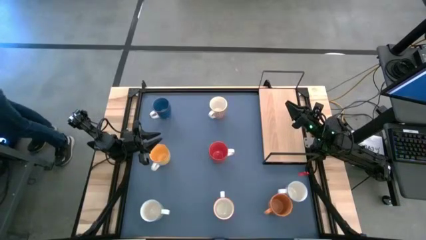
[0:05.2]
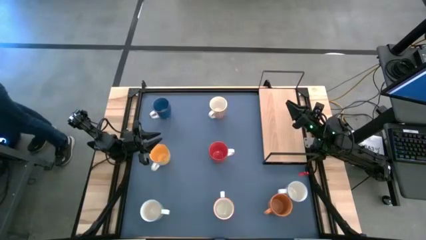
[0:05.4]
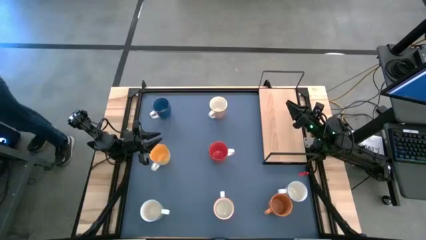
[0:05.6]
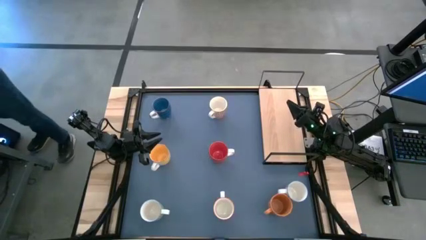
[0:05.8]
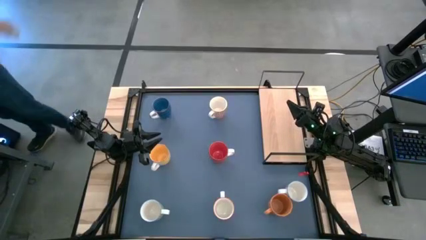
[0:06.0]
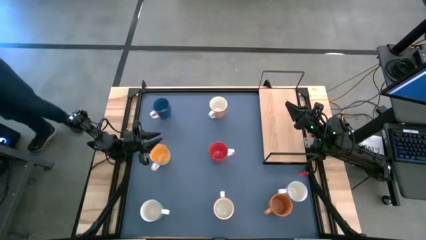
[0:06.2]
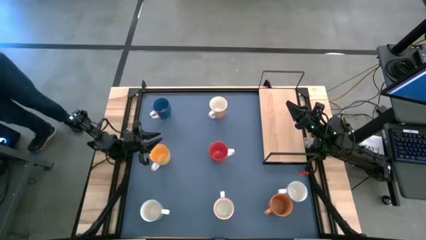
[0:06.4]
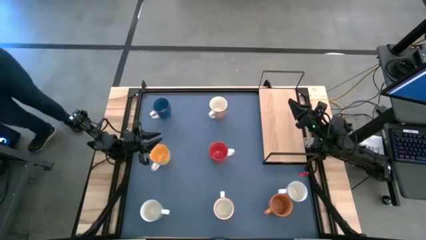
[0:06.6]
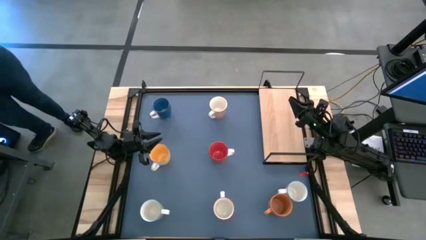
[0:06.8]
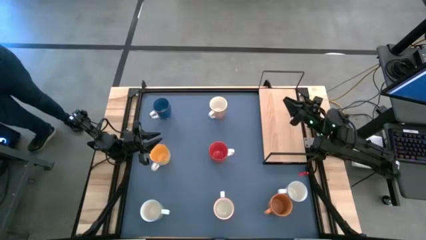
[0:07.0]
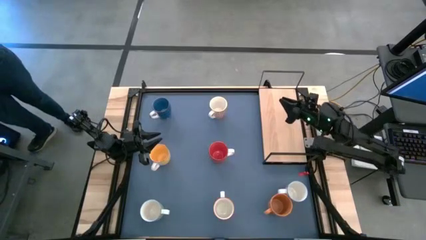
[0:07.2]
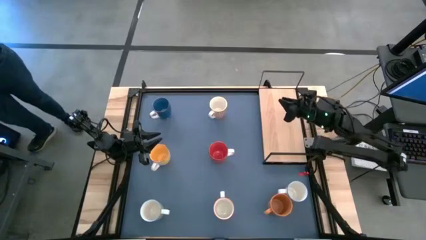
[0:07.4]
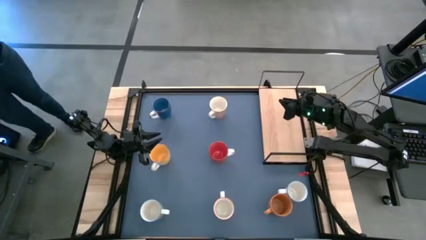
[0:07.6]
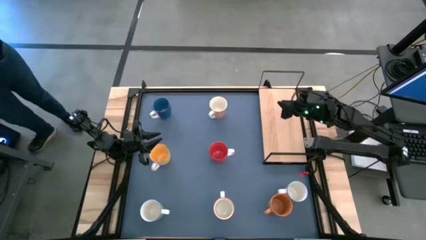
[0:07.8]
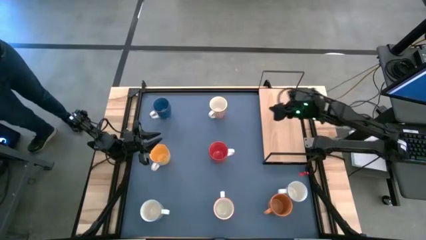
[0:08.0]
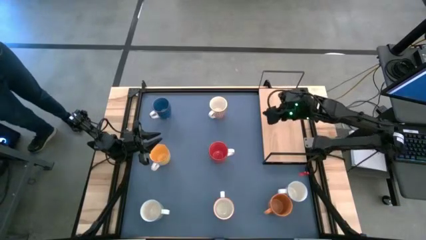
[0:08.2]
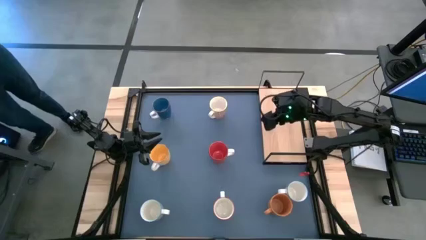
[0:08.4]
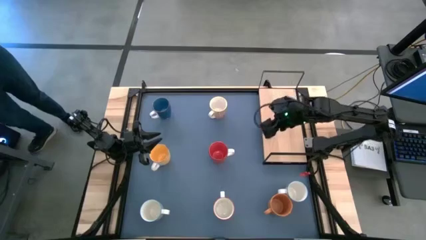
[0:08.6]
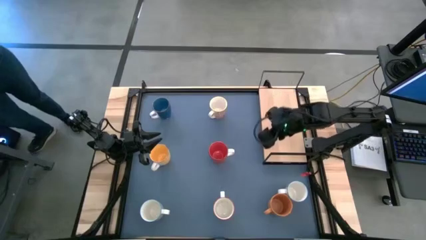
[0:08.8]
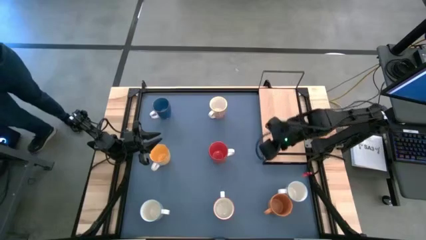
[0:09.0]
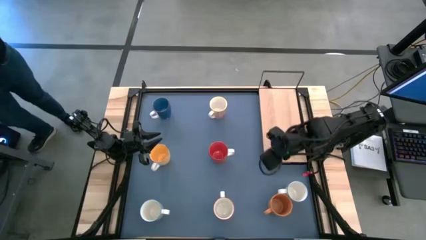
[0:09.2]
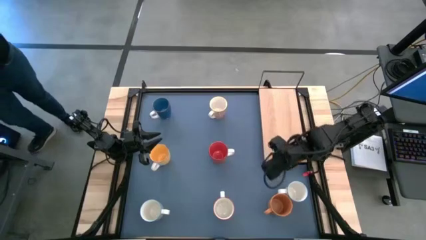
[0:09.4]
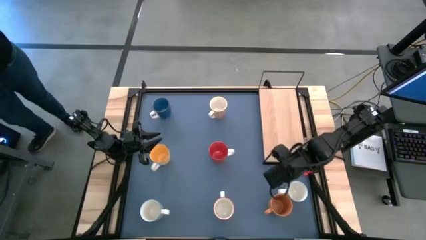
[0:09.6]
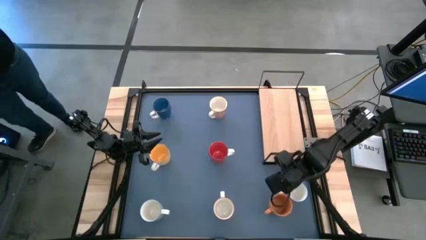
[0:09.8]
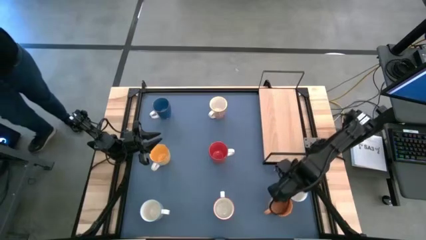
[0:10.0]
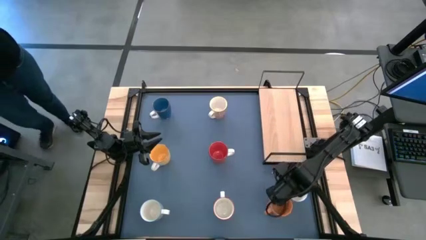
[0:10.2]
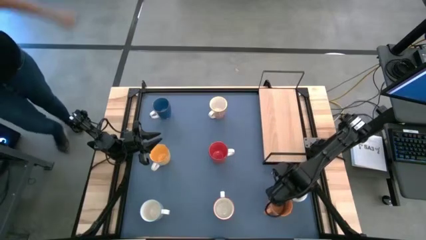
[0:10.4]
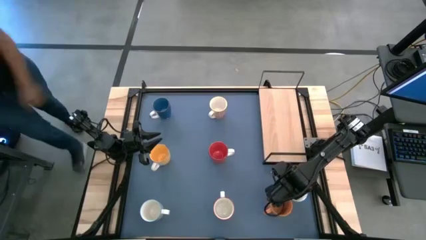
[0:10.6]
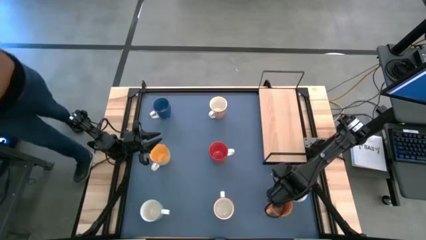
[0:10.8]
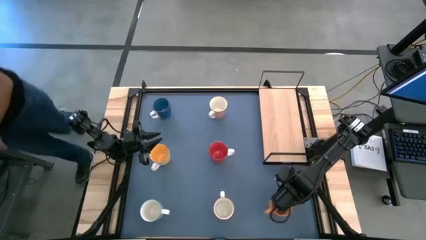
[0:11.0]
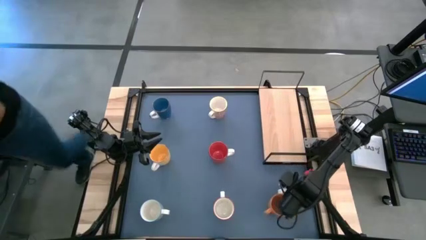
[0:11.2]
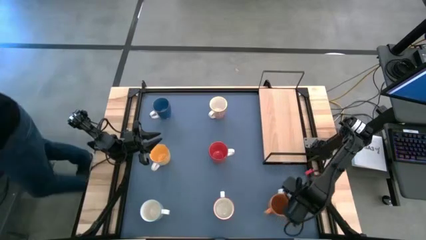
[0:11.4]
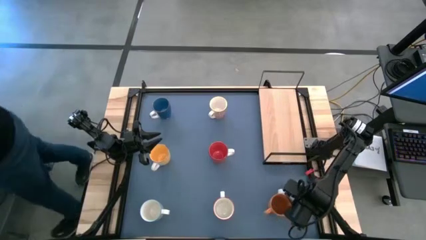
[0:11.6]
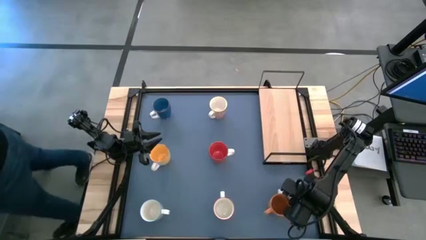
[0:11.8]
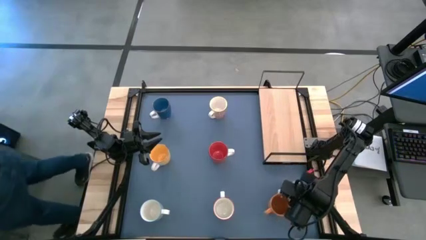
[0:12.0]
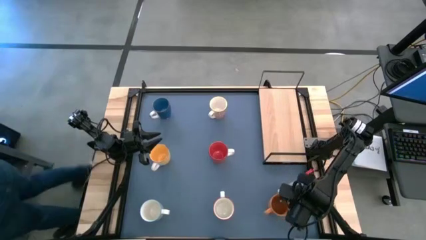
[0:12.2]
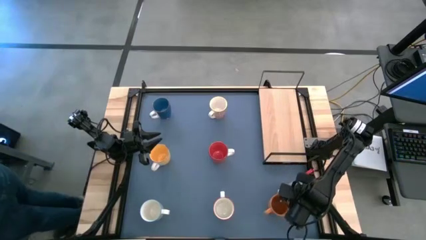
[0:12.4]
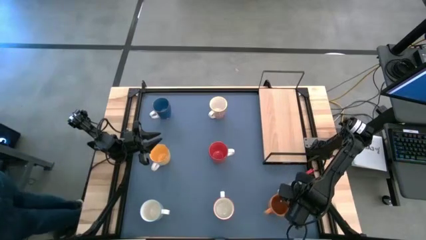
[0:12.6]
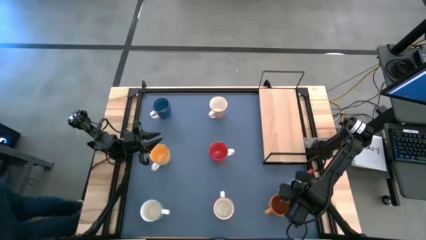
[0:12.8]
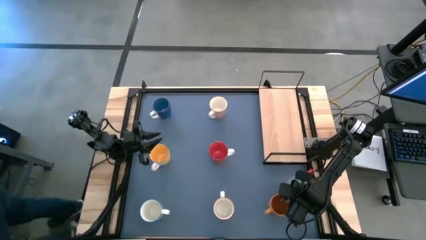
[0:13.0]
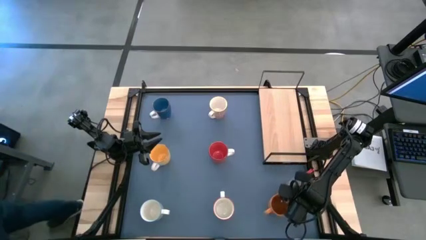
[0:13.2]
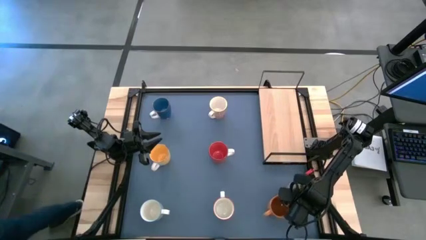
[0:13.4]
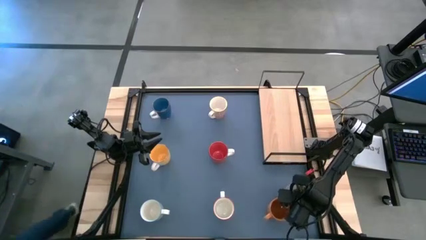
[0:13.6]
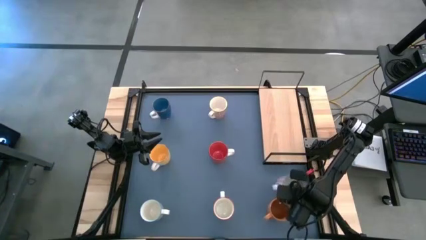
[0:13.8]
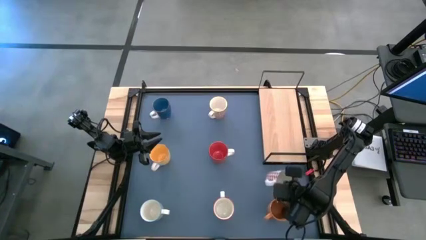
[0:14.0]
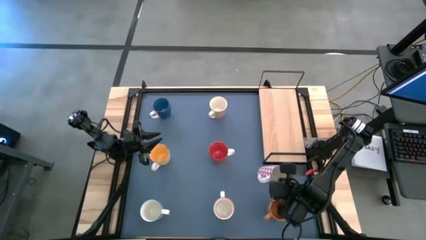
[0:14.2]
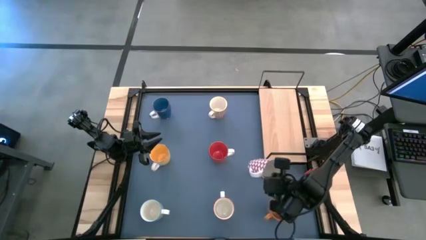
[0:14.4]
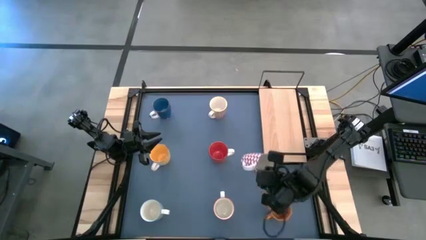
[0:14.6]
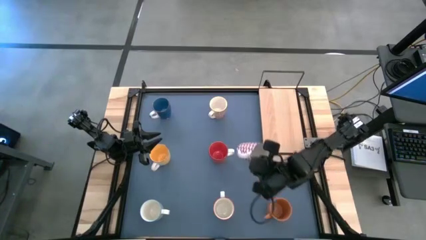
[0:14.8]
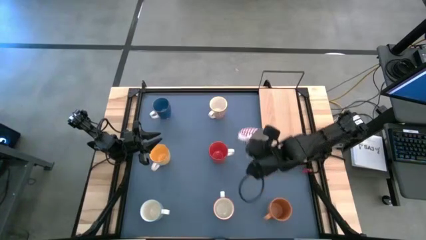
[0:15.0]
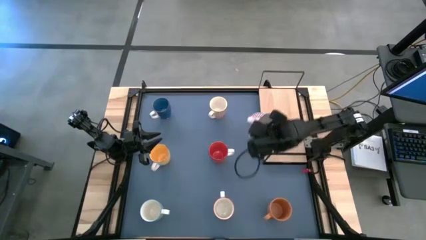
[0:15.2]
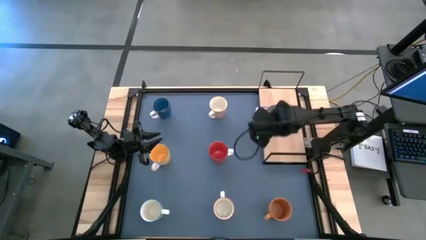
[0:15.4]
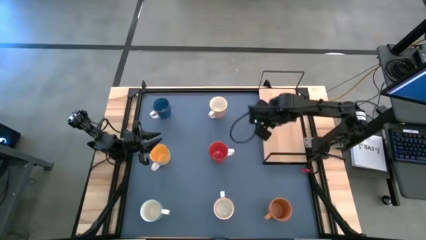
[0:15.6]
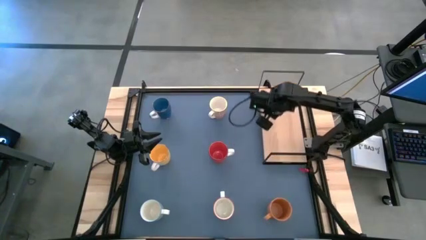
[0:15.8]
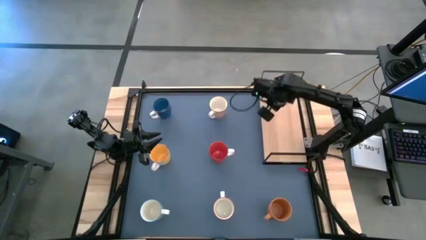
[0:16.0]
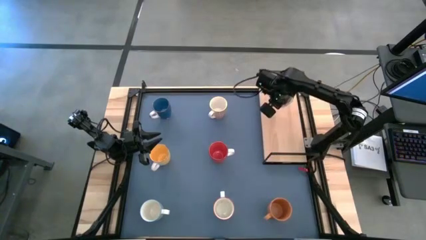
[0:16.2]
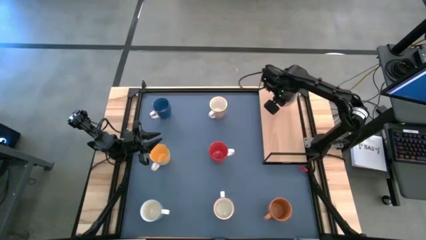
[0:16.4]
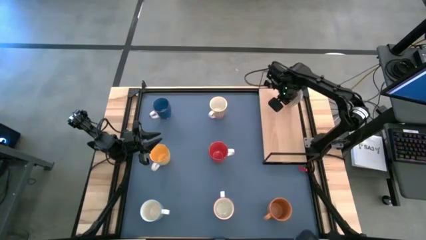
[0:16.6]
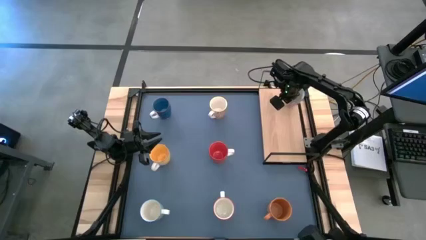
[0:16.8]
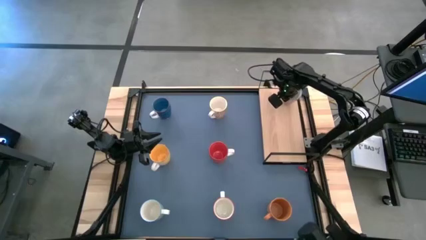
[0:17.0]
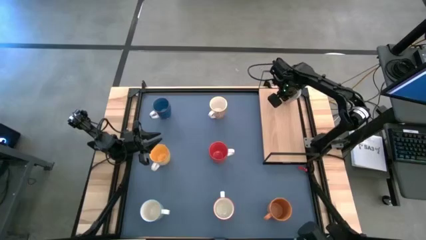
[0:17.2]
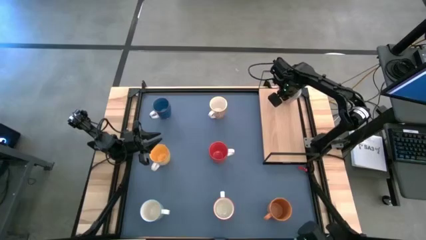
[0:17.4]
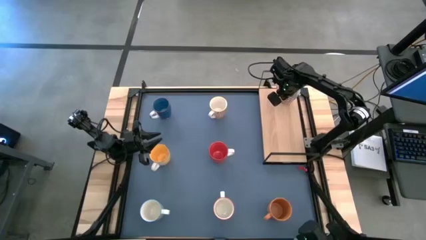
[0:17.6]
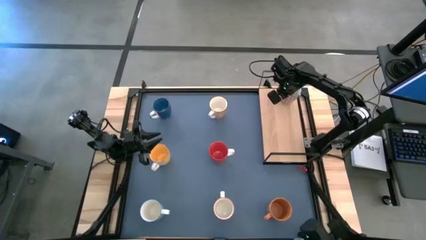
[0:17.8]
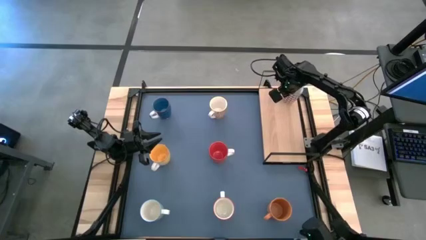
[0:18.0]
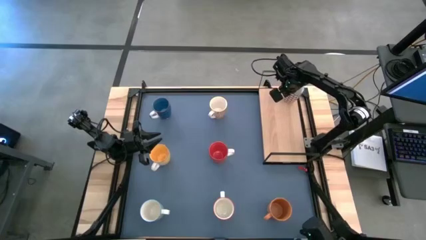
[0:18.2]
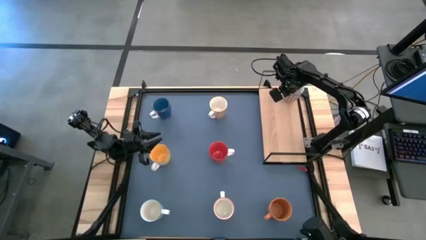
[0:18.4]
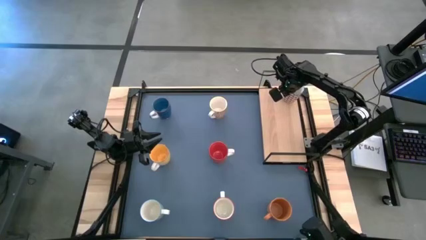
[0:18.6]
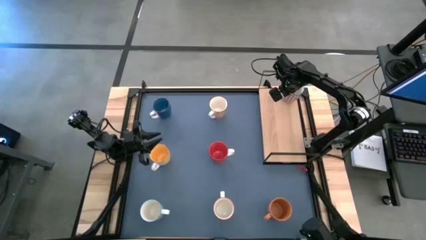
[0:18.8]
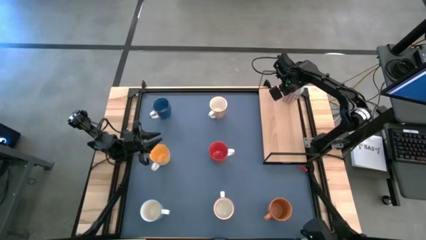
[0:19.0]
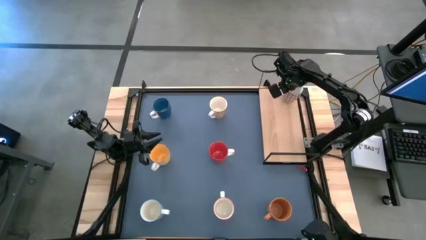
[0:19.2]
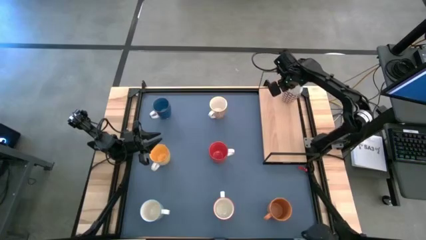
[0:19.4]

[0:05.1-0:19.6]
Task: Place coffee mugs
Put the red patterned mug on the shelf
